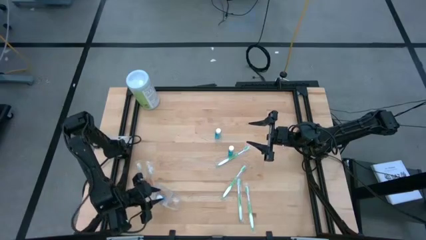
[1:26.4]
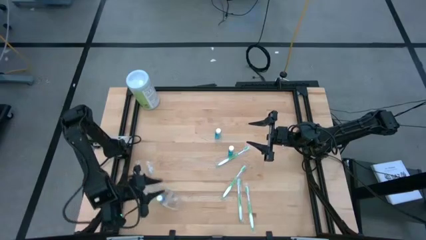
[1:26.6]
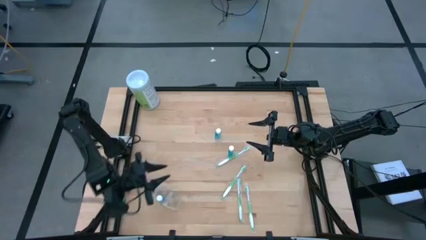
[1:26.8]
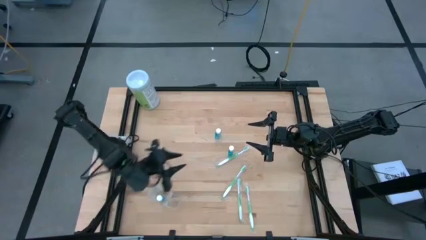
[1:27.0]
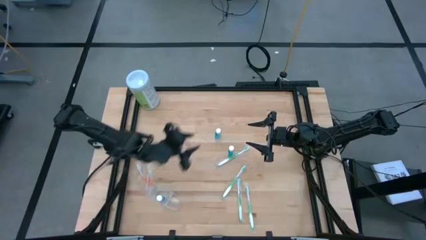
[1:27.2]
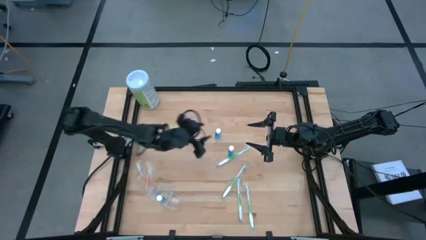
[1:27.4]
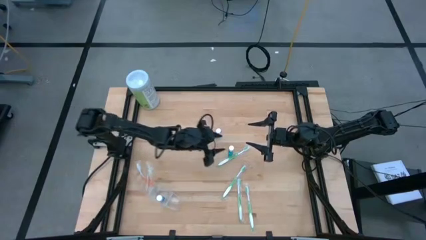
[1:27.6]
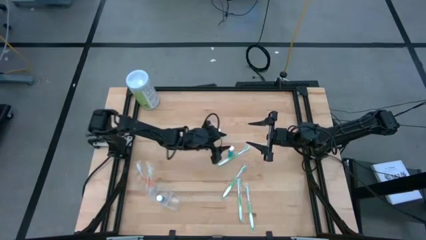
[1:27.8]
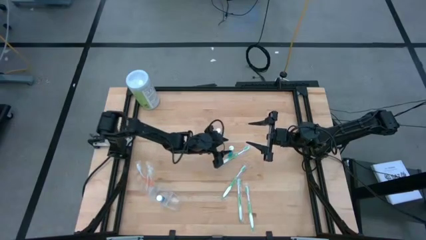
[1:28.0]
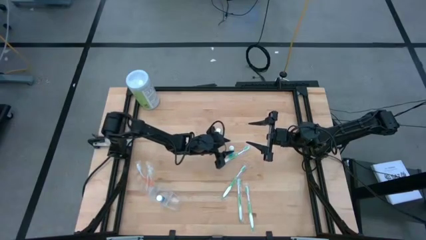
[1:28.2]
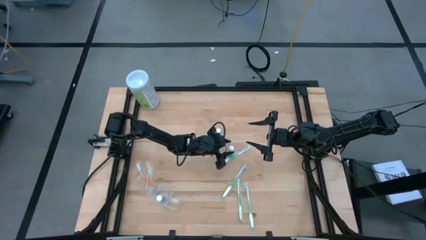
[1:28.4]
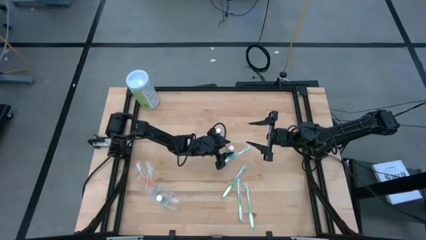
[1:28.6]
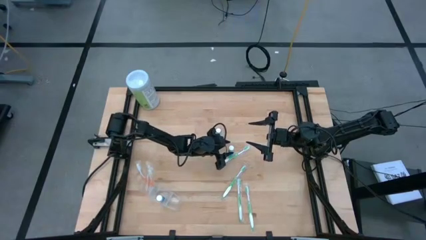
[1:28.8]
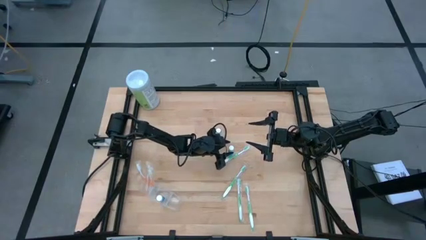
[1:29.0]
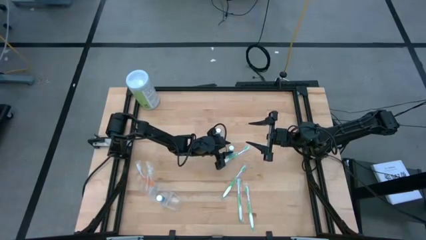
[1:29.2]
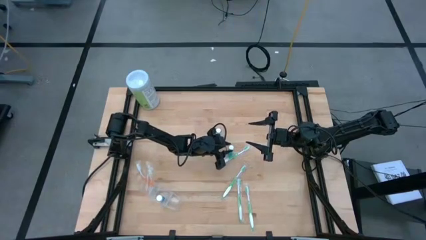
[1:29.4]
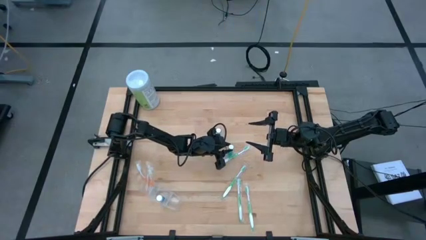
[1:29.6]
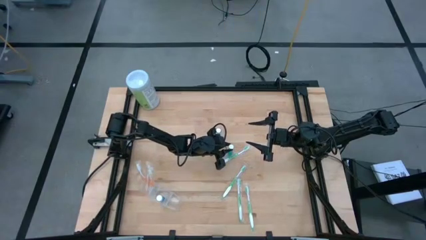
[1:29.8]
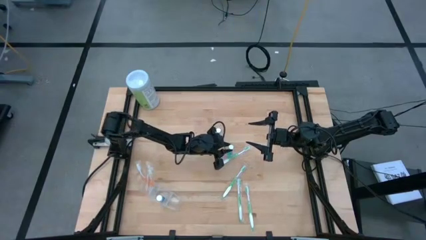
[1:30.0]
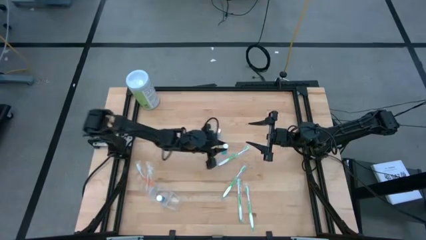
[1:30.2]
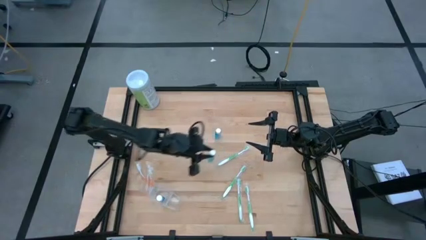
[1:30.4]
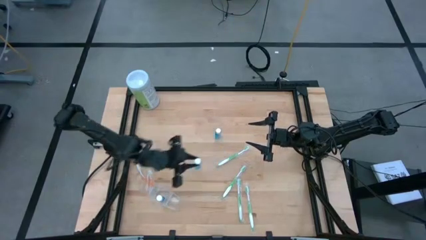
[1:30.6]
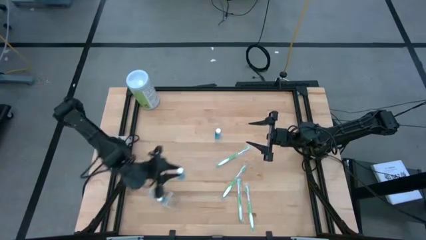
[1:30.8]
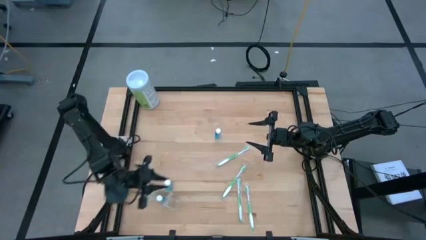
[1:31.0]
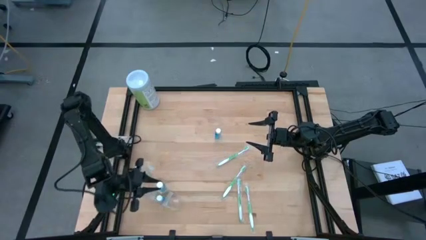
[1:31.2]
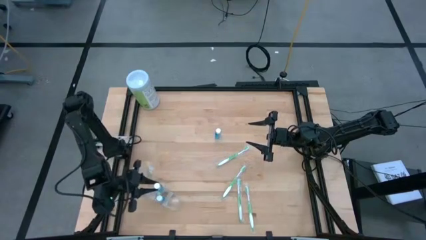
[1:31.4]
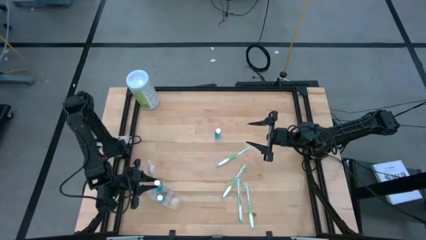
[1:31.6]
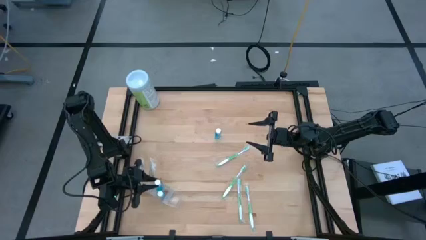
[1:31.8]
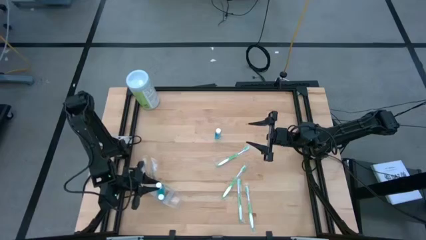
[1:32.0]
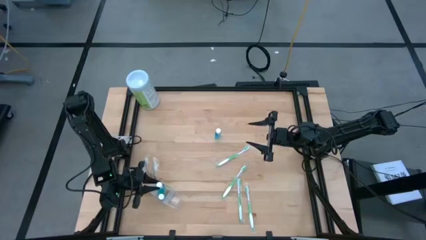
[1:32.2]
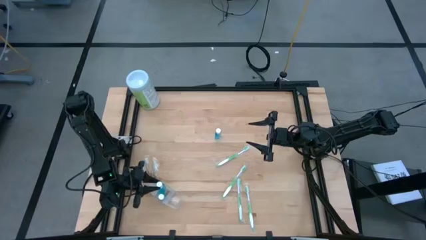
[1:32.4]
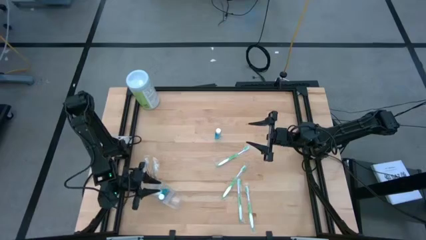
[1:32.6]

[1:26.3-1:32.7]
Task: Pick & Place toothbrushing station
Put the blue mouthwash into the transparent organizer

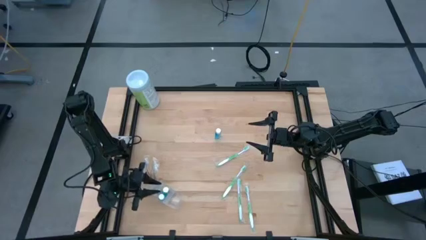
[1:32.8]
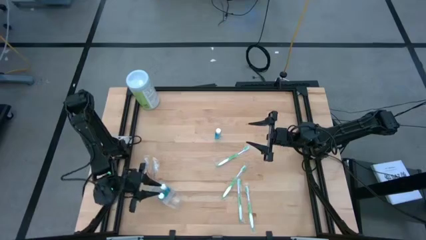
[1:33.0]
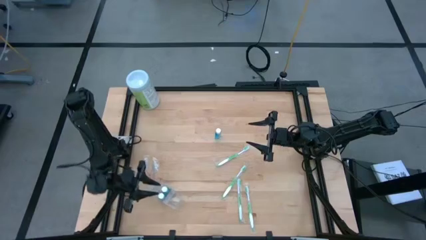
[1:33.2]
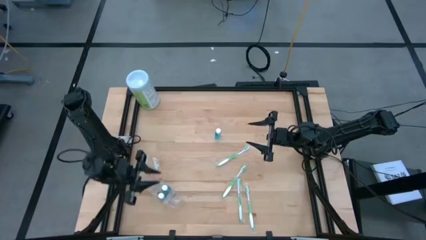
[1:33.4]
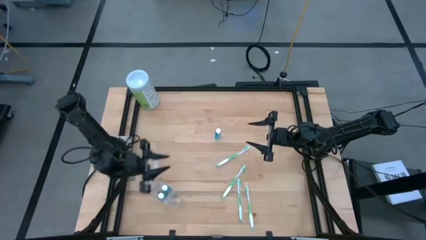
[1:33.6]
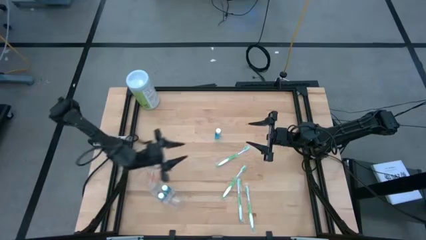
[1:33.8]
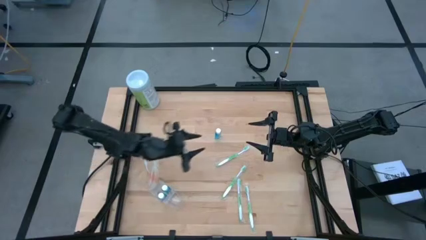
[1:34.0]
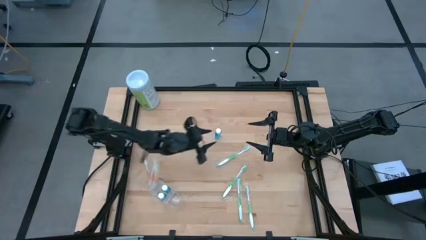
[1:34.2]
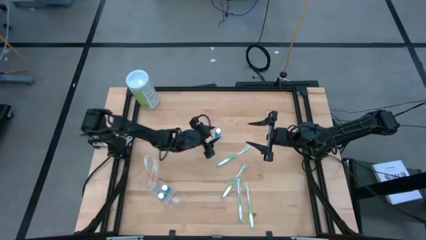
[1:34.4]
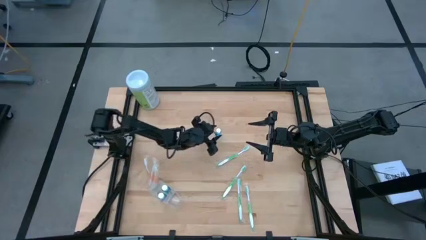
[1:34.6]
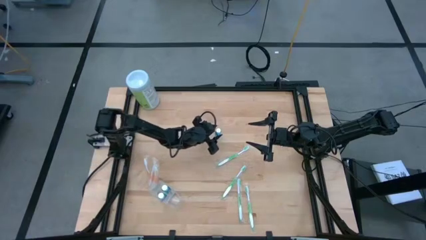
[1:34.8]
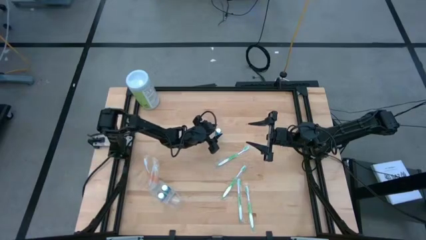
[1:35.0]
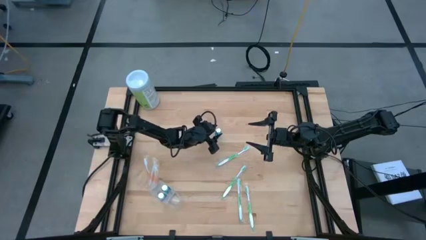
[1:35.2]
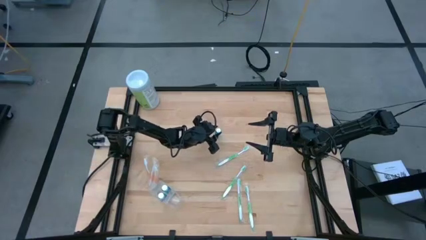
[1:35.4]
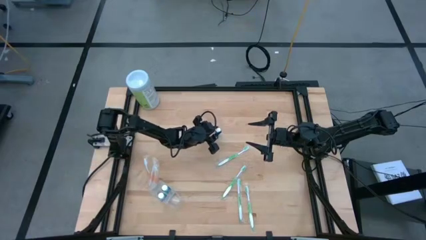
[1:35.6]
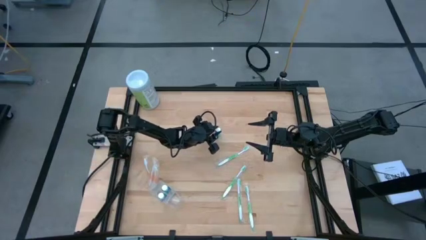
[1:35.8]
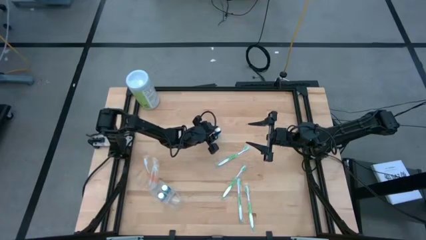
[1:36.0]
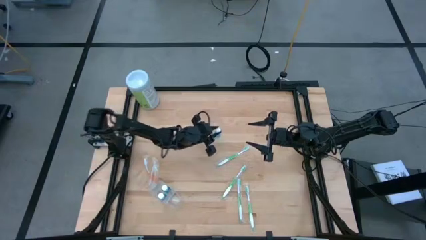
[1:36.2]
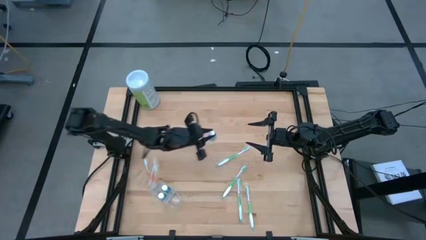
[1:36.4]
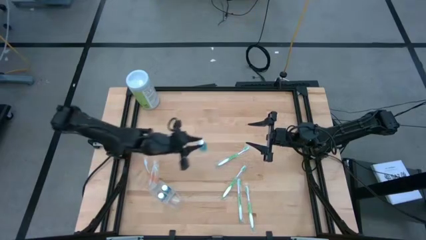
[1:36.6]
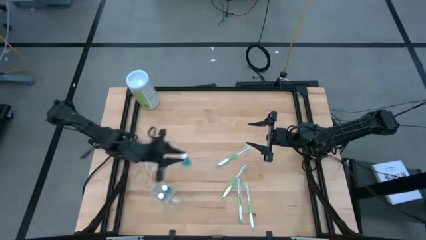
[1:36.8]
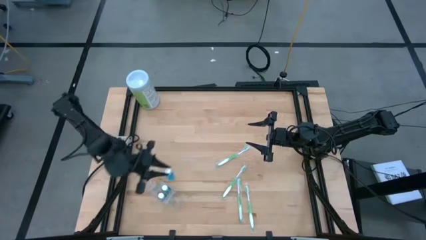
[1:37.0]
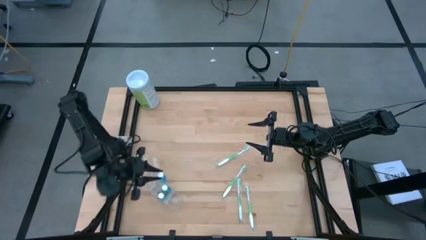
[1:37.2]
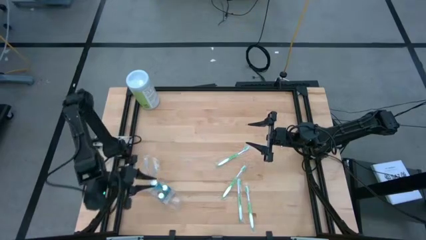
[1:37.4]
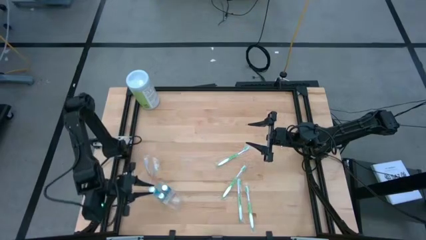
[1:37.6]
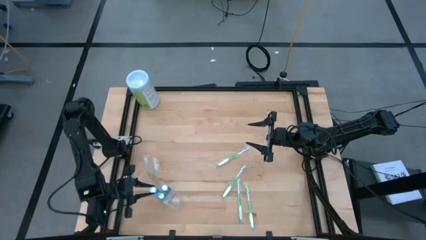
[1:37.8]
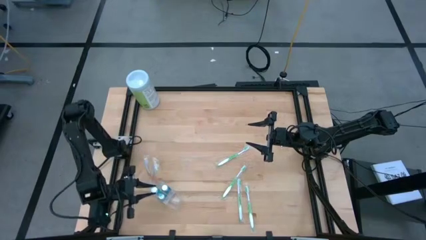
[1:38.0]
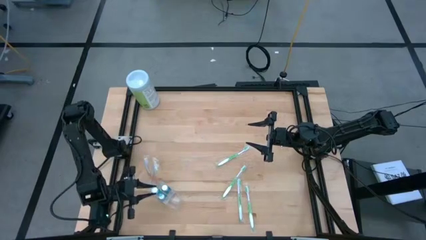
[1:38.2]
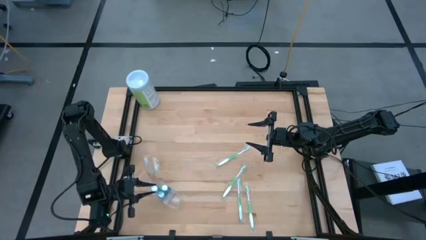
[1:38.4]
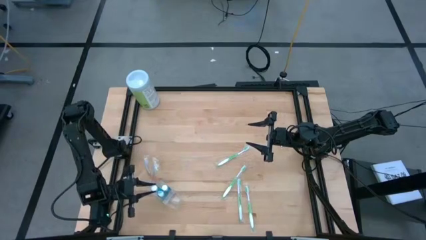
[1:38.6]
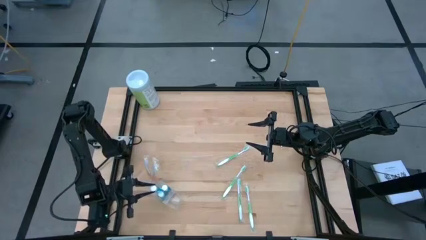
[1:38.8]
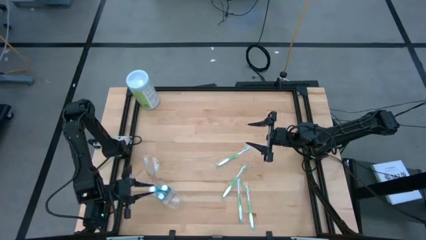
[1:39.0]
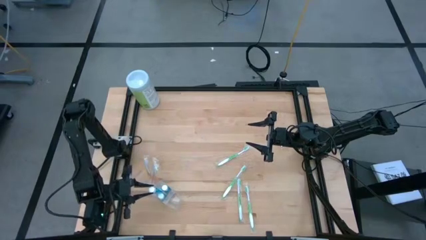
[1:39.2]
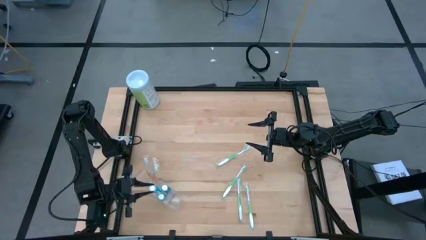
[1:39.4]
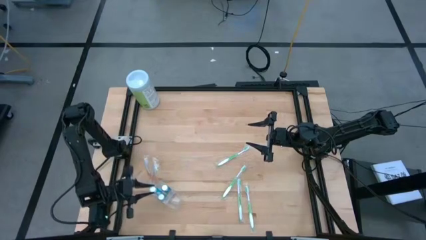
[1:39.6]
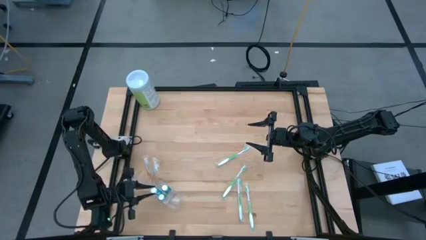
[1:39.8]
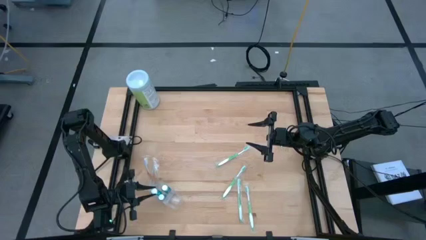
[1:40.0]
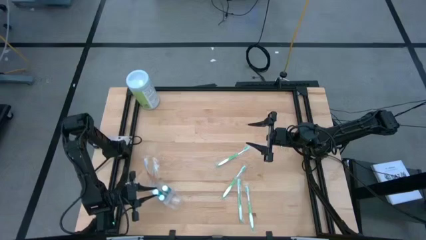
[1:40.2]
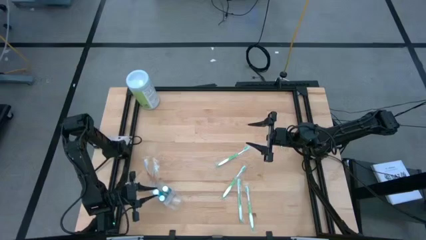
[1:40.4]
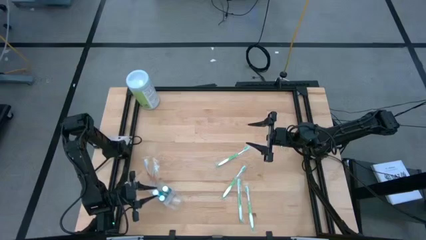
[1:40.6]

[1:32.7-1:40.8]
Put the blue mouthwash into the transparent organizer
